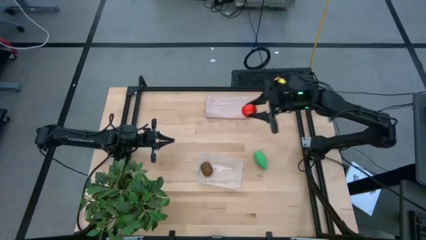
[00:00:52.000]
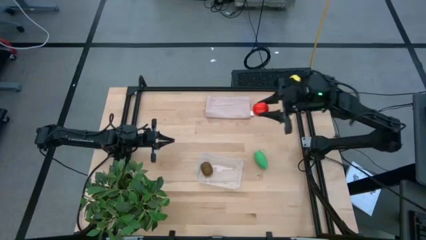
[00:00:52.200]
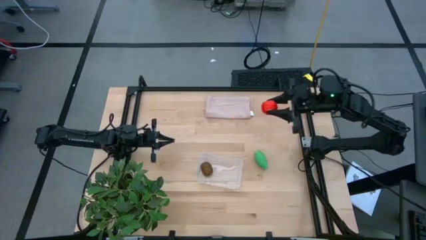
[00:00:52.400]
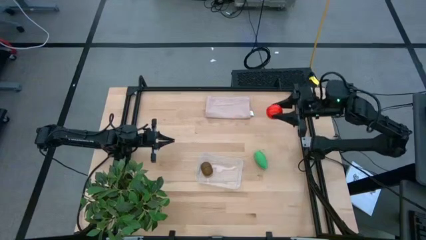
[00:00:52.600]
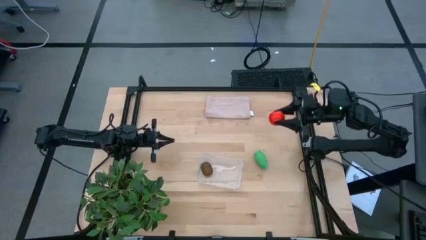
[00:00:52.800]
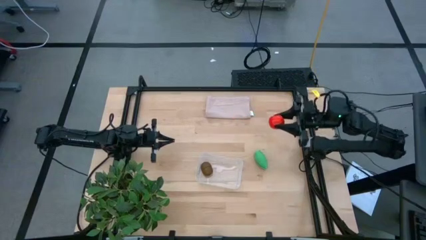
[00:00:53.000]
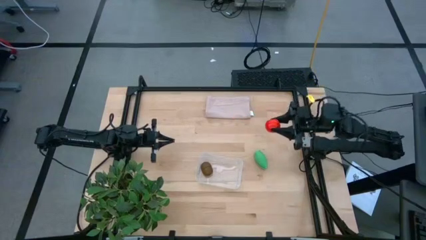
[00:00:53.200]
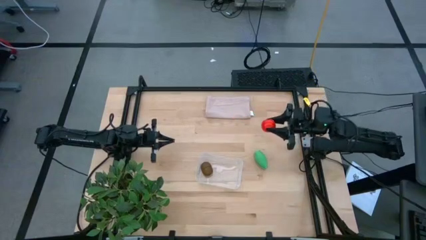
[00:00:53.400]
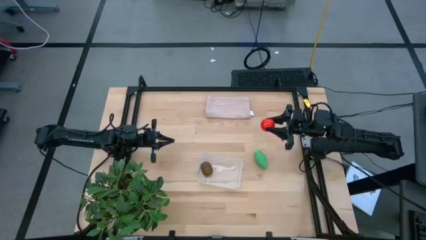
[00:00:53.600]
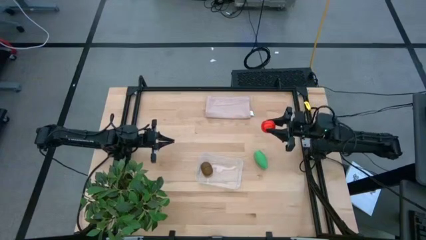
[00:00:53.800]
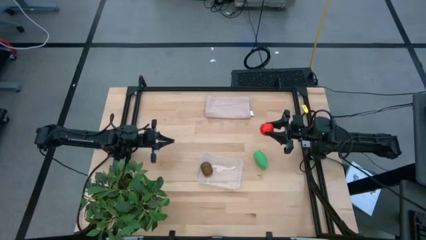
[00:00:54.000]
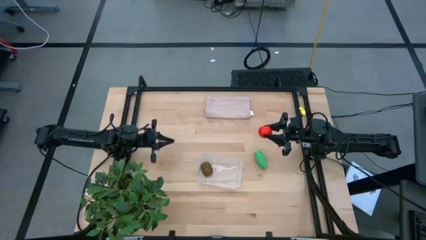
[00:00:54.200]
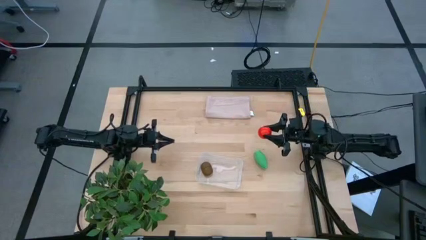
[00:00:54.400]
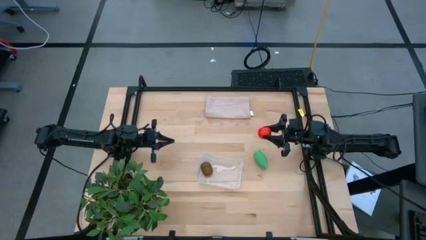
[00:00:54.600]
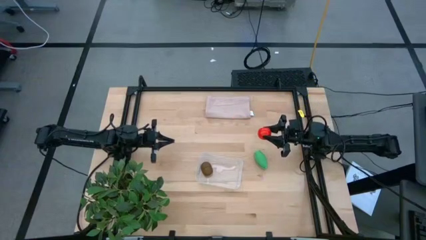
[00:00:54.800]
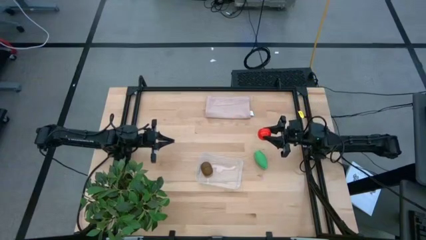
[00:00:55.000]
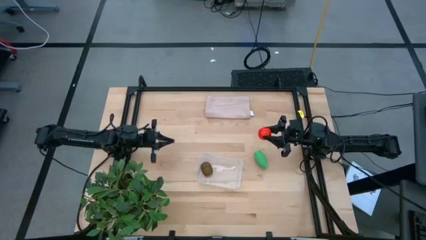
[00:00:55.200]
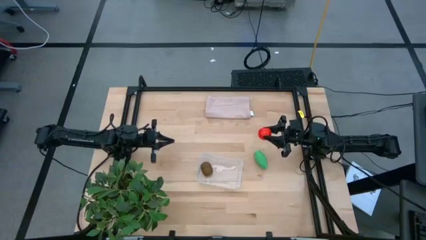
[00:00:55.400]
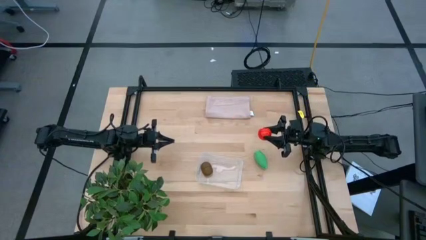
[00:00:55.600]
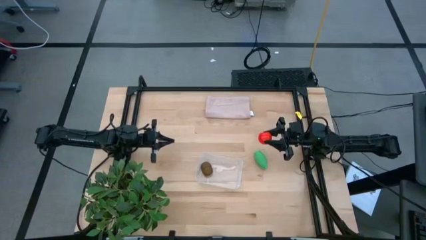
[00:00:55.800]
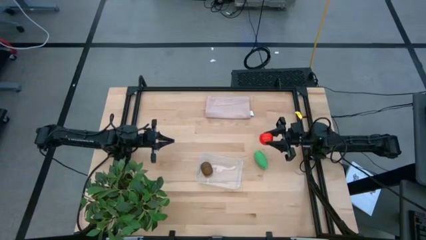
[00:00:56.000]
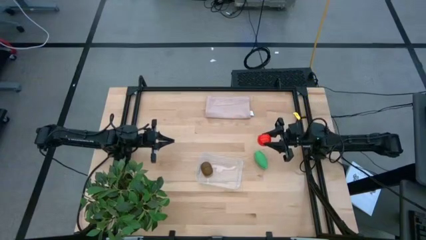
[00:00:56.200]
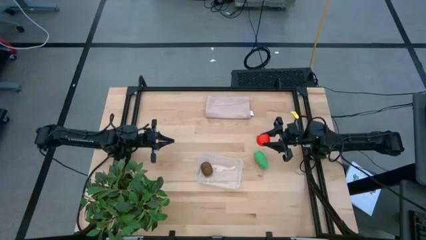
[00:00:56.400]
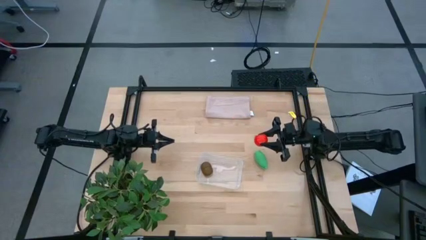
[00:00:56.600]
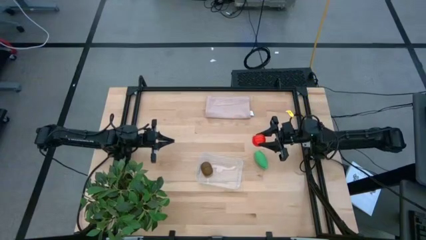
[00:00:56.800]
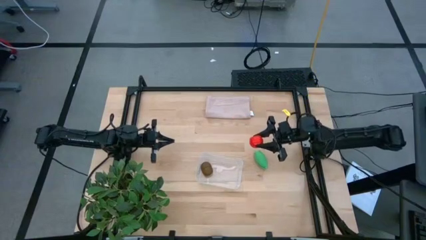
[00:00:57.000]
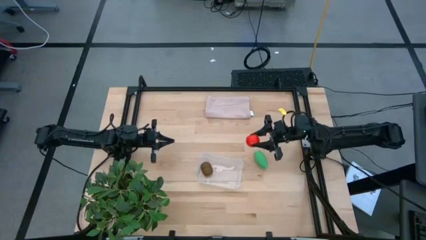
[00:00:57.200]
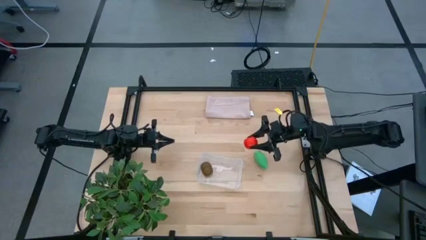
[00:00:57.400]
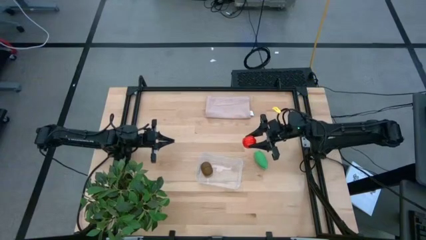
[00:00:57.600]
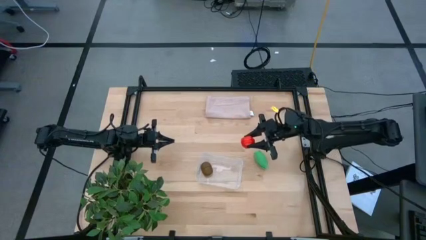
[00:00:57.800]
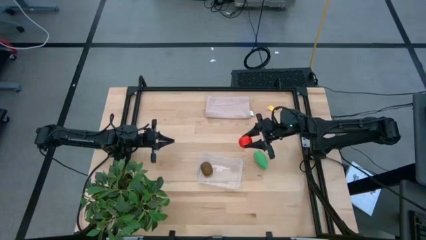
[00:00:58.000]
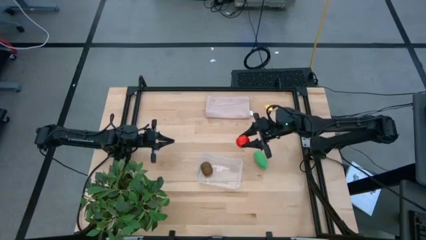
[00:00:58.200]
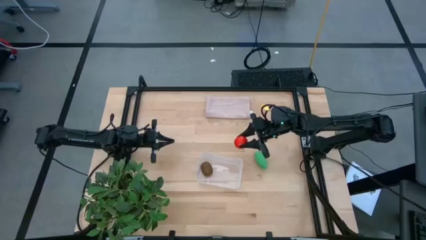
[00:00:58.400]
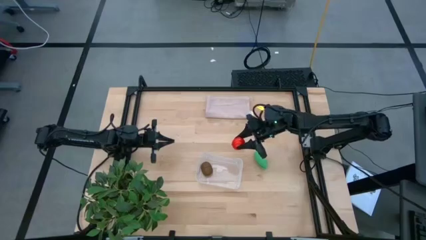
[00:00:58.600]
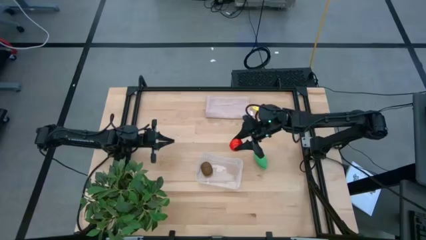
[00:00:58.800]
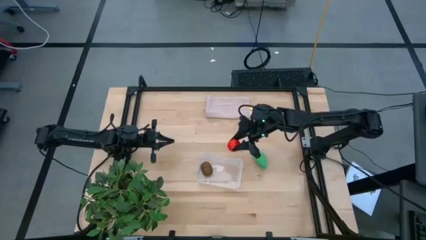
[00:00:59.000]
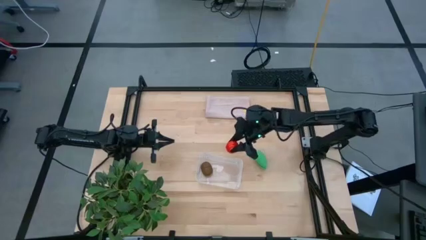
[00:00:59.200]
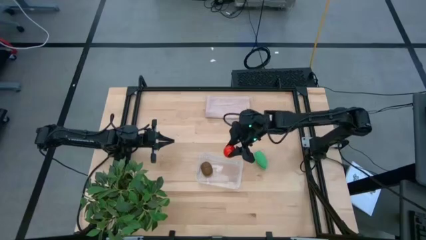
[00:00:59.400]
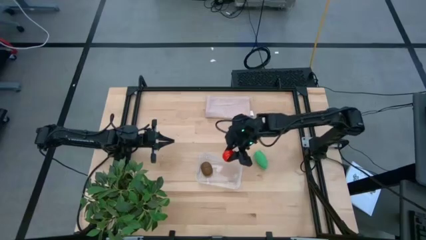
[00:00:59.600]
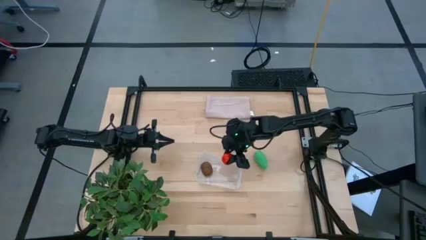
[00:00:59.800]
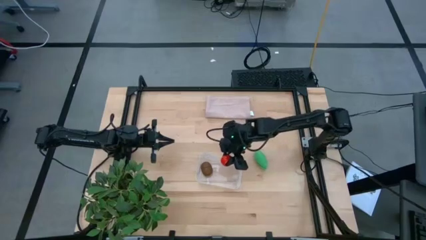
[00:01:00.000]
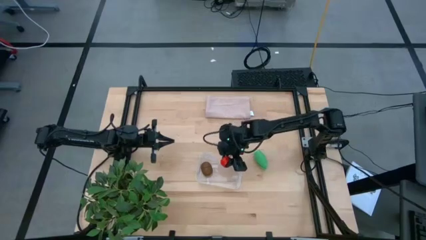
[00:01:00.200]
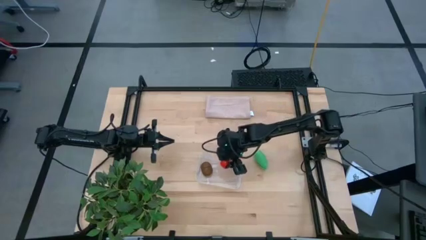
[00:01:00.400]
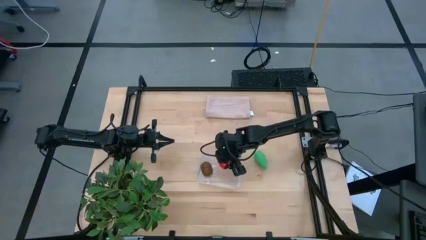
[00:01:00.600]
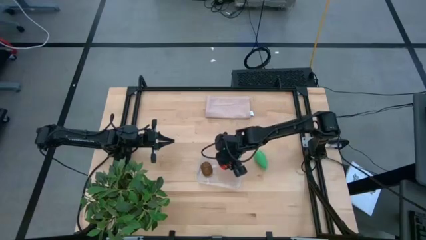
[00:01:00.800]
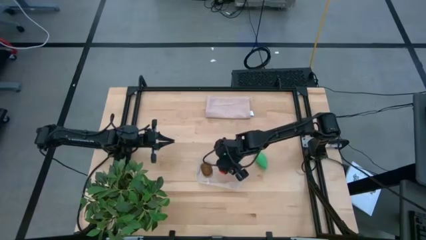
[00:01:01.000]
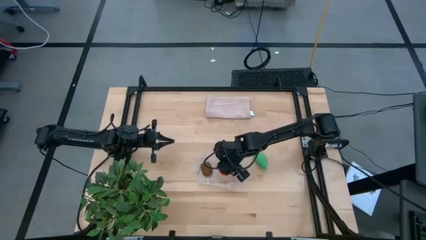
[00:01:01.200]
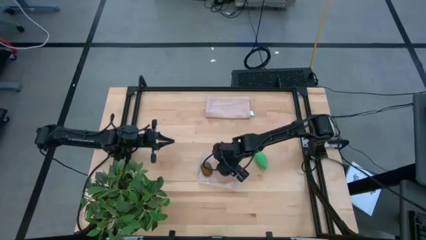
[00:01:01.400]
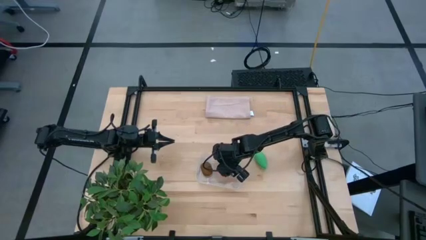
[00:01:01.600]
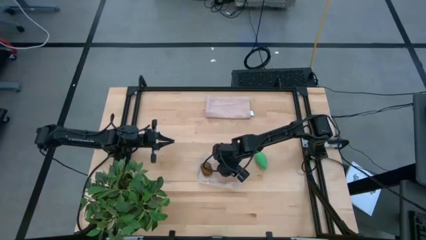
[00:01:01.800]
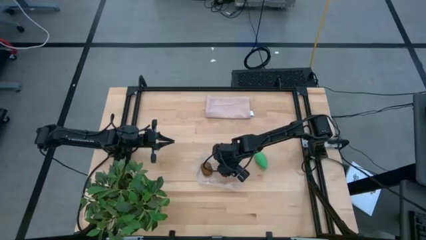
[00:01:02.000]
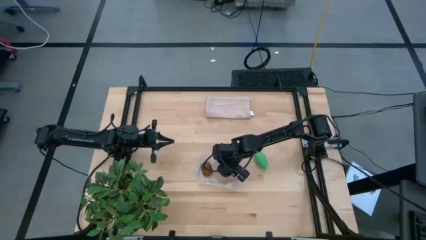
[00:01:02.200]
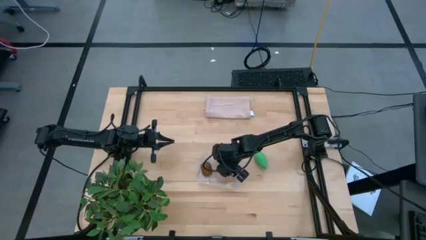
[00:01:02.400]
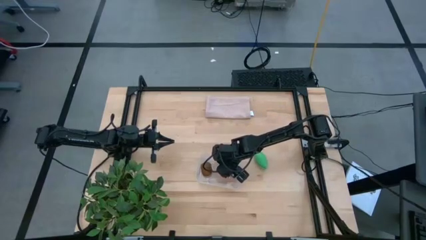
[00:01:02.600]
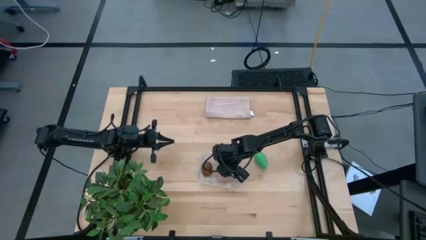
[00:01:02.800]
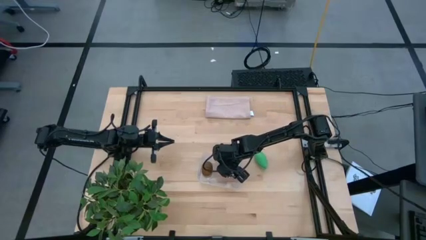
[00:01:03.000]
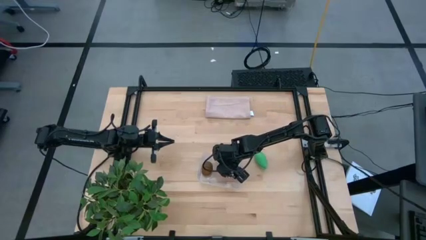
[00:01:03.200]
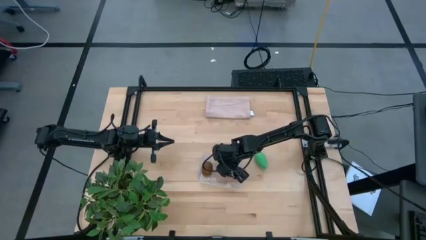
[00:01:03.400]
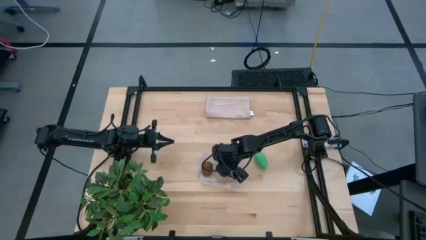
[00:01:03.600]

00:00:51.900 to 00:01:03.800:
Task: Pick and placing Produce into tupperware
Put the tomato into the transparent bin

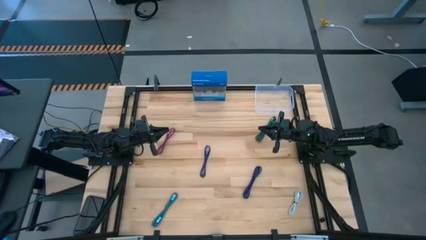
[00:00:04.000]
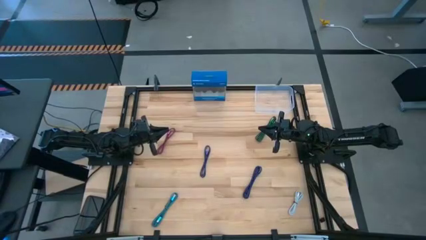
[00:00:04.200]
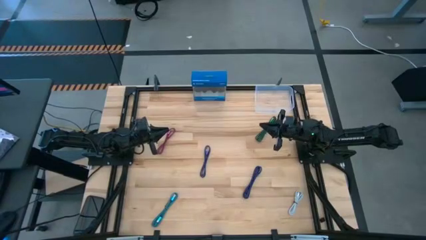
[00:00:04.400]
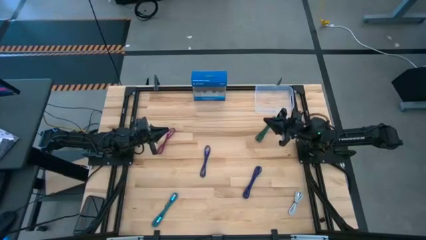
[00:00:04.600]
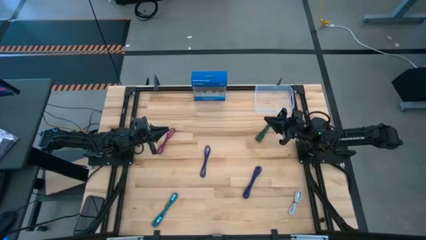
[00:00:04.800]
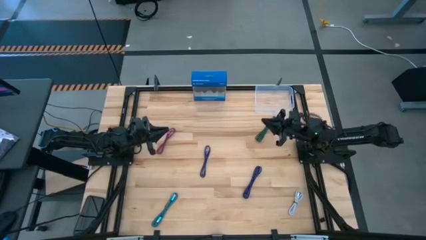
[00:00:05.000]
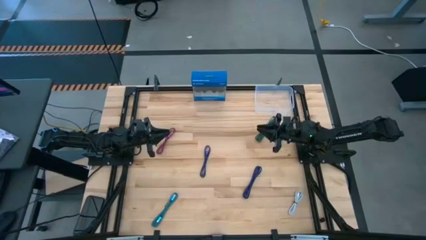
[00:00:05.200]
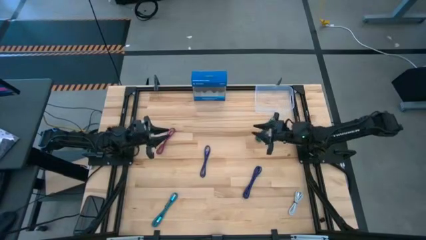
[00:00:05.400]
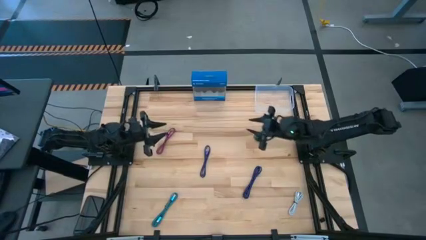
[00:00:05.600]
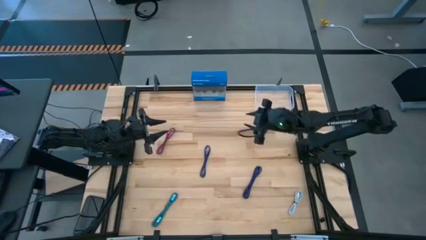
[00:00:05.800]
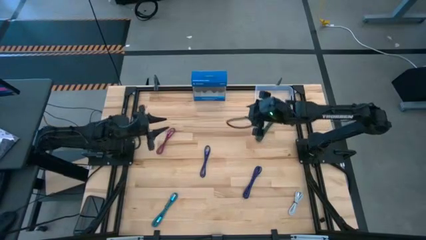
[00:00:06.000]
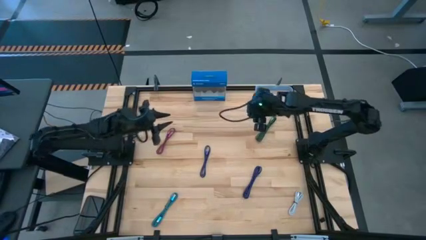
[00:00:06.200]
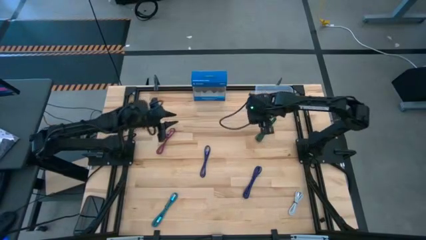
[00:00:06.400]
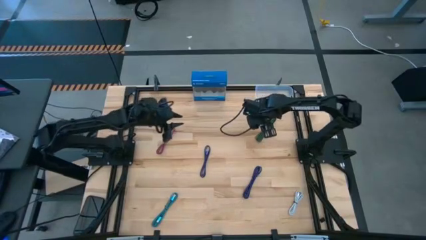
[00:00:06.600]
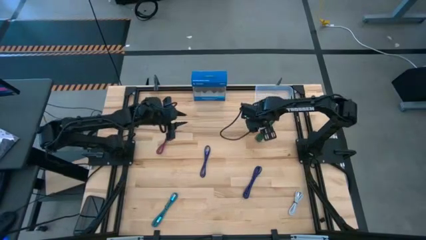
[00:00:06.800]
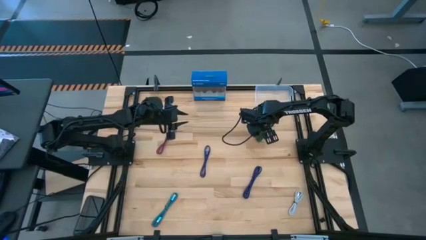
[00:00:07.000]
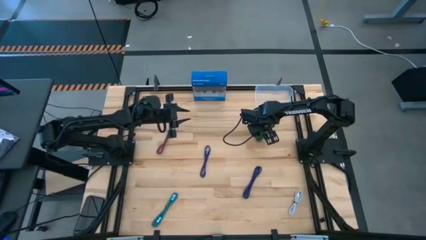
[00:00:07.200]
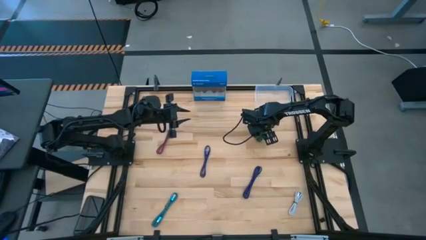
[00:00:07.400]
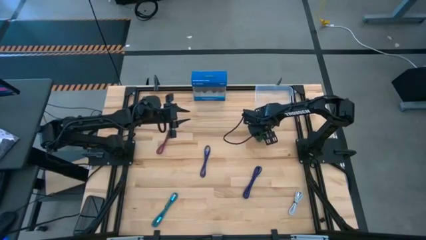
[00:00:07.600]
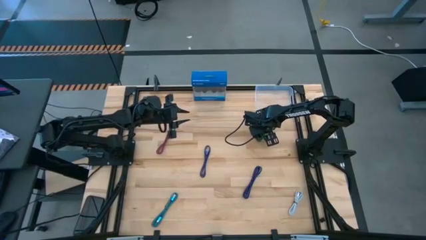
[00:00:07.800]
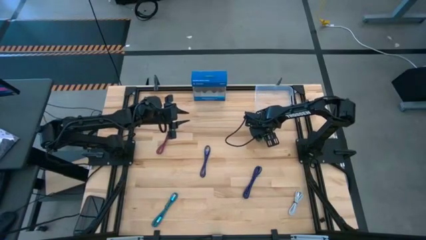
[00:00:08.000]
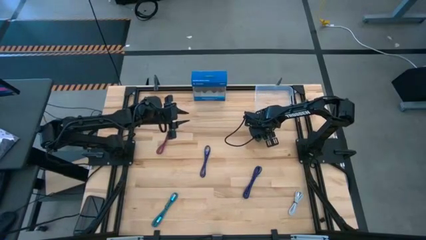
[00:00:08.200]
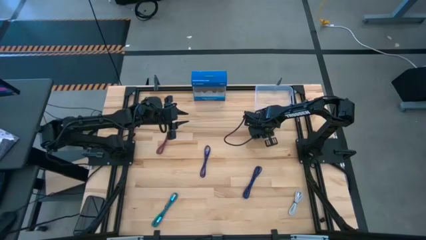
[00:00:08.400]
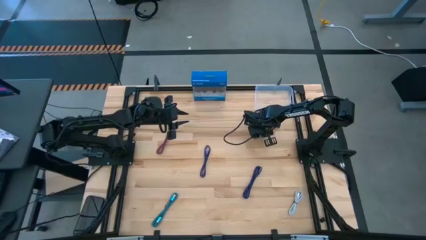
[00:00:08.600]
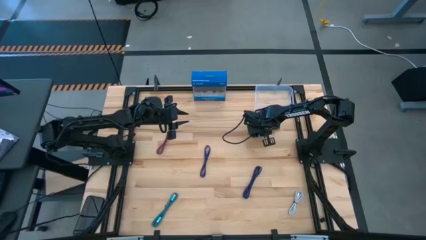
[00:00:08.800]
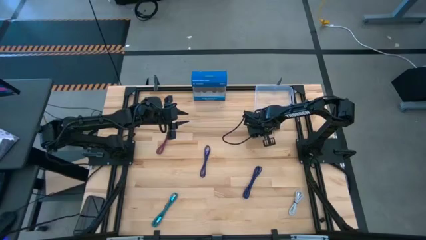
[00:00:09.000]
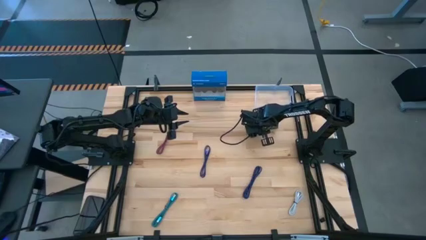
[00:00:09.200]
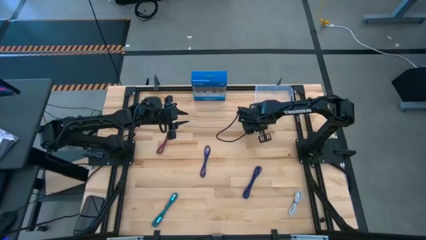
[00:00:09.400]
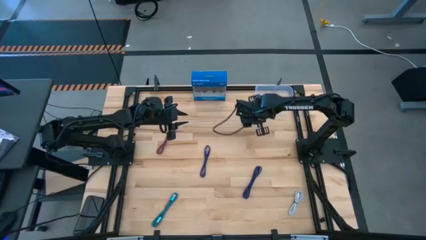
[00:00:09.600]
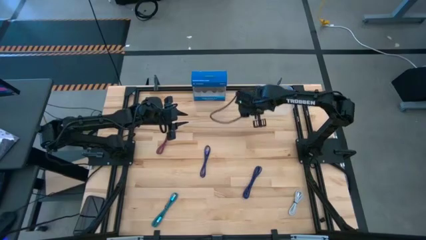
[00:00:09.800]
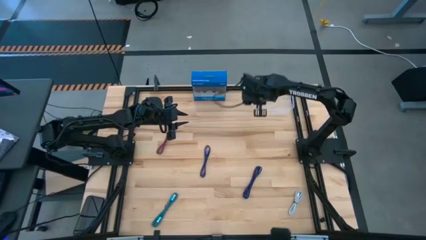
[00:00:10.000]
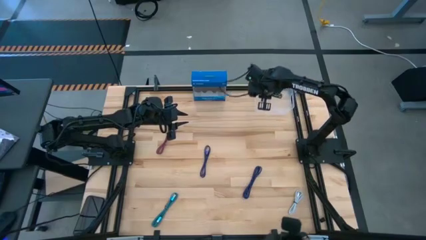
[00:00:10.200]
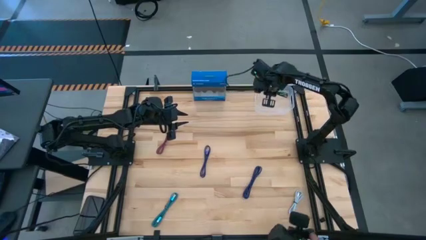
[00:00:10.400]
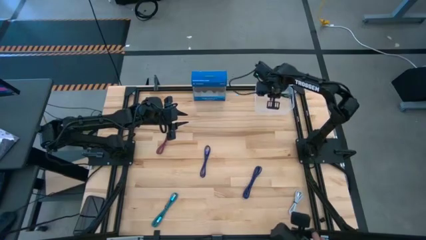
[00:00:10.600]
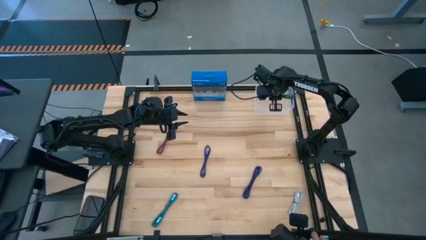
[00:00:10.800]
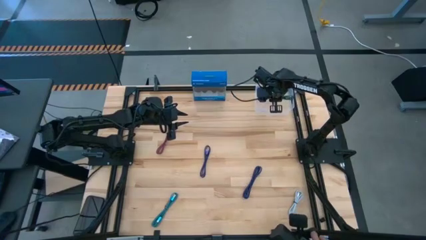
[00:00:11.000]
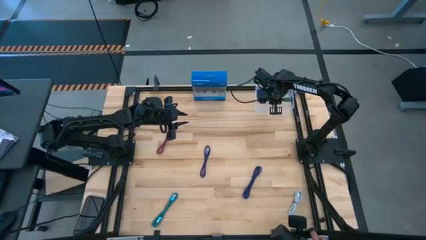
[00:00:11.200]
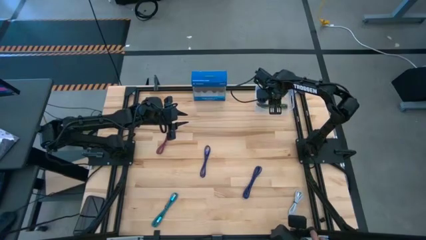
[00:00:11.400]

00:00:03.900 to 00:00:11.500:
Task: Pick and place USB-C Cables
Put the green charger cable into the bin
